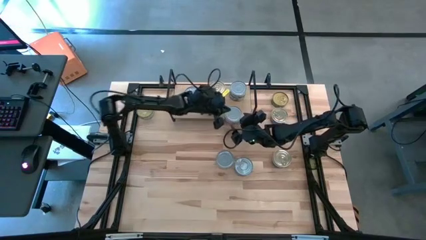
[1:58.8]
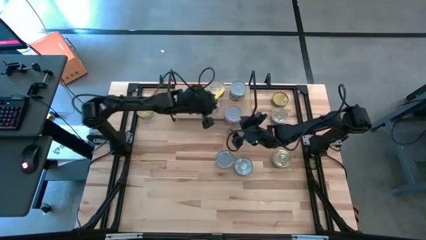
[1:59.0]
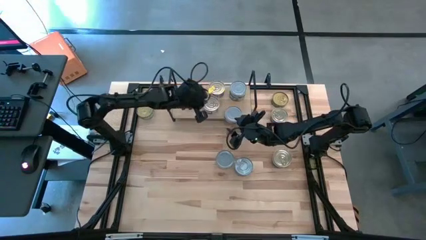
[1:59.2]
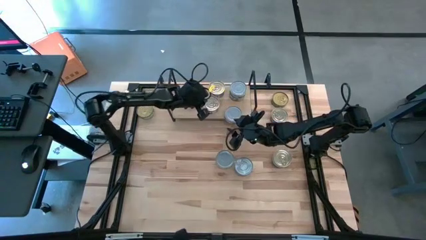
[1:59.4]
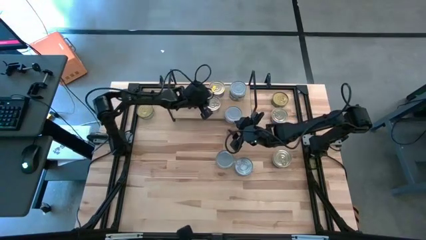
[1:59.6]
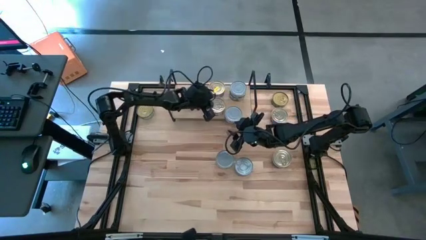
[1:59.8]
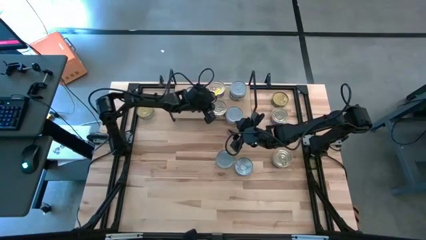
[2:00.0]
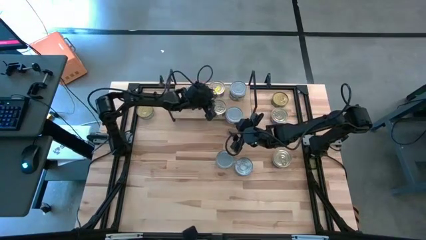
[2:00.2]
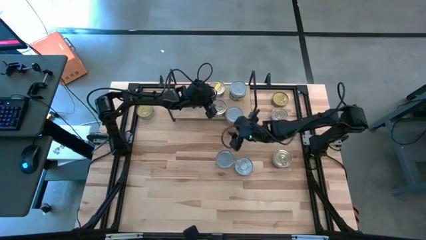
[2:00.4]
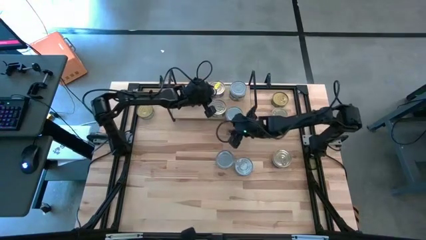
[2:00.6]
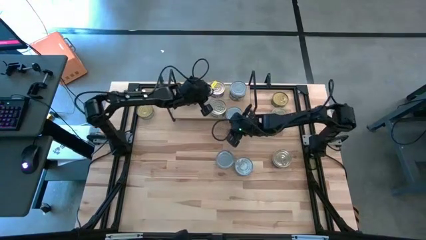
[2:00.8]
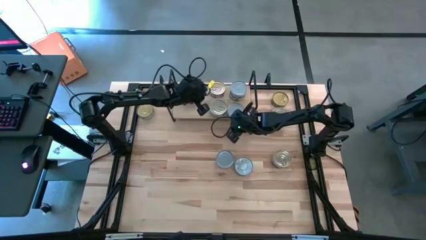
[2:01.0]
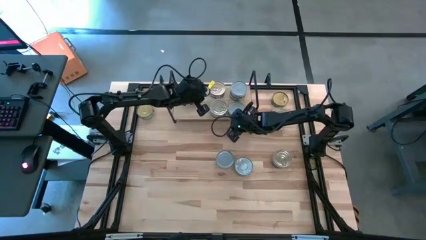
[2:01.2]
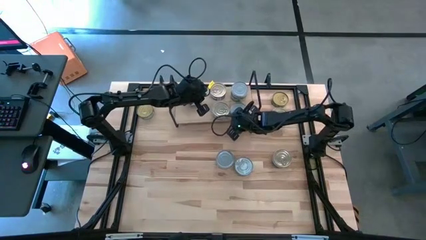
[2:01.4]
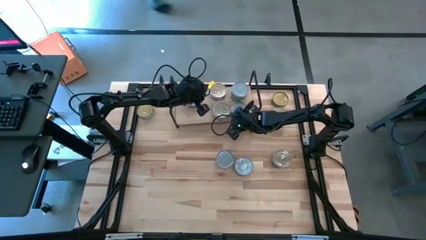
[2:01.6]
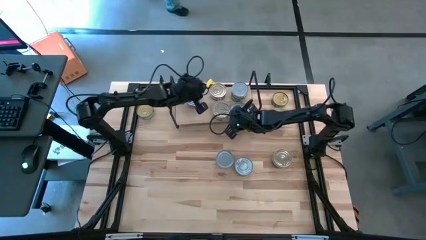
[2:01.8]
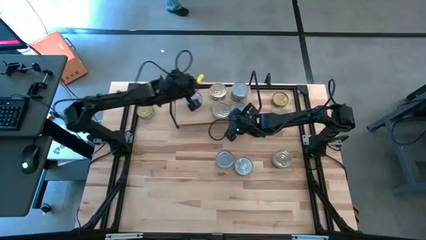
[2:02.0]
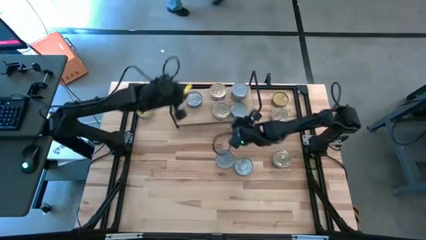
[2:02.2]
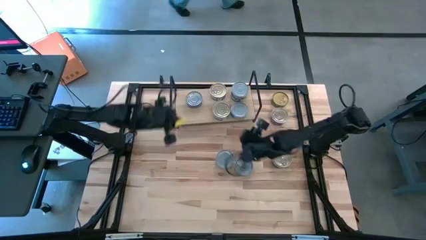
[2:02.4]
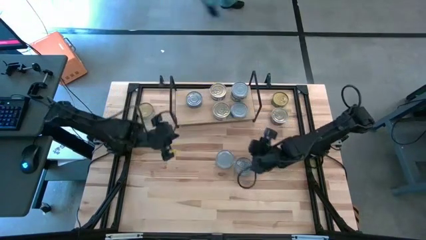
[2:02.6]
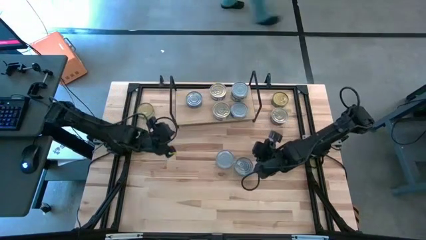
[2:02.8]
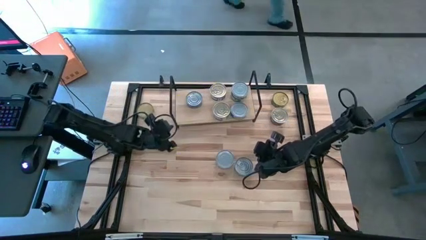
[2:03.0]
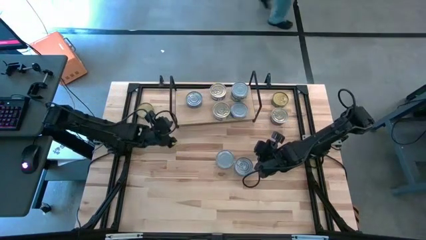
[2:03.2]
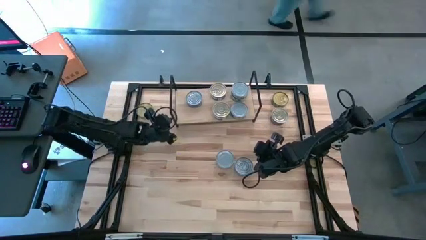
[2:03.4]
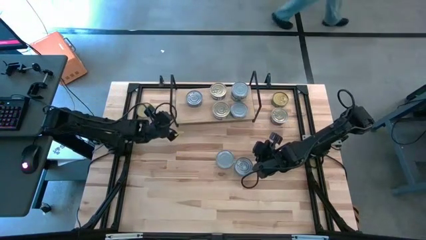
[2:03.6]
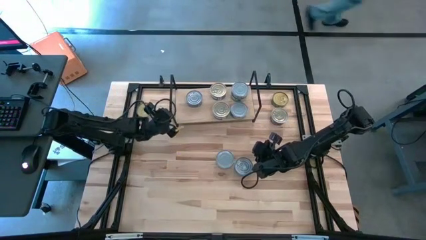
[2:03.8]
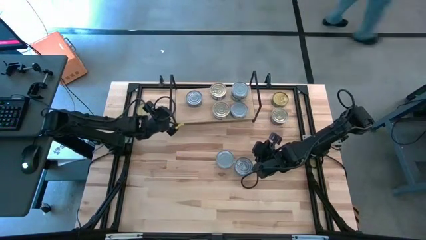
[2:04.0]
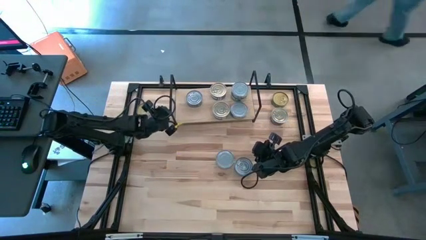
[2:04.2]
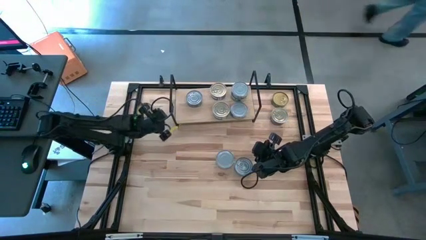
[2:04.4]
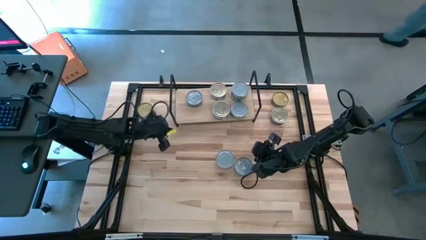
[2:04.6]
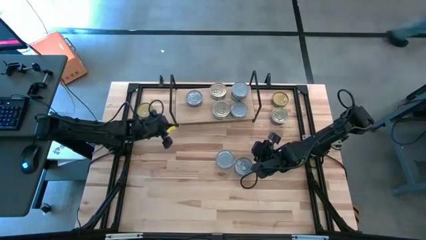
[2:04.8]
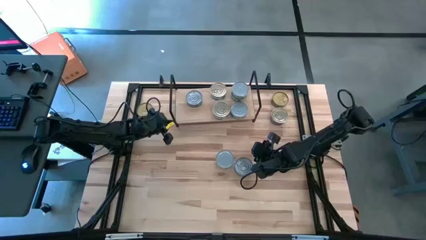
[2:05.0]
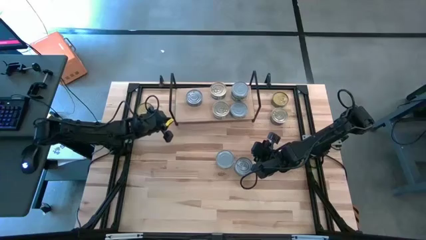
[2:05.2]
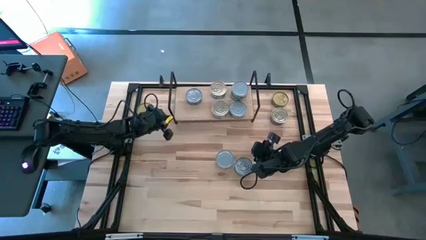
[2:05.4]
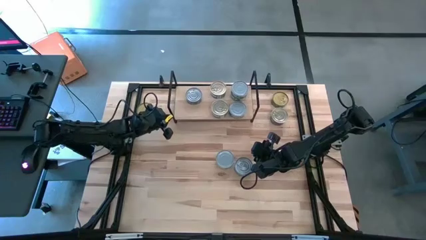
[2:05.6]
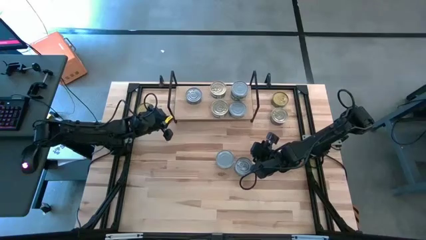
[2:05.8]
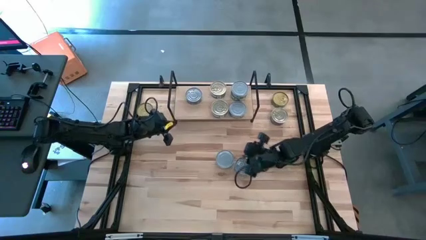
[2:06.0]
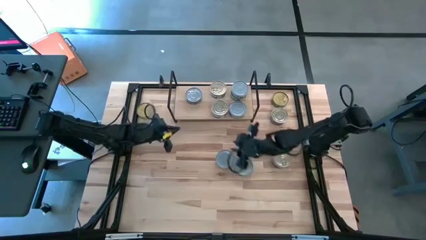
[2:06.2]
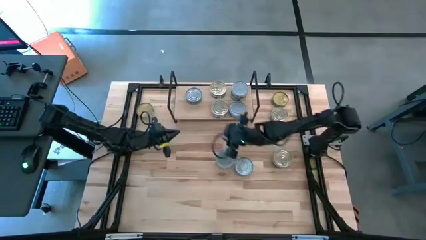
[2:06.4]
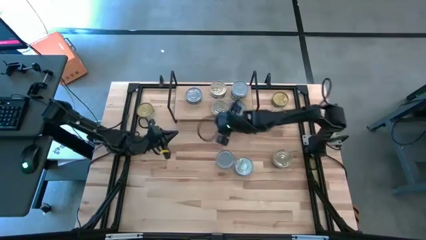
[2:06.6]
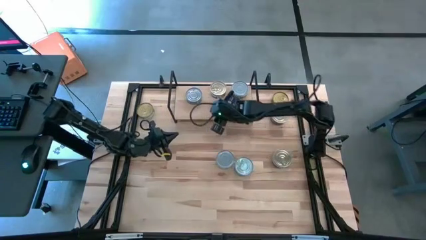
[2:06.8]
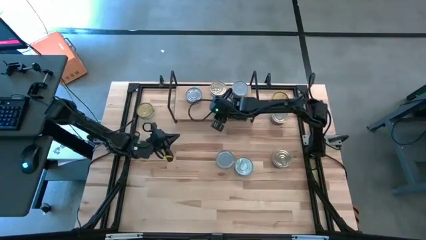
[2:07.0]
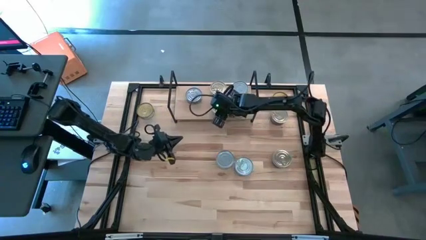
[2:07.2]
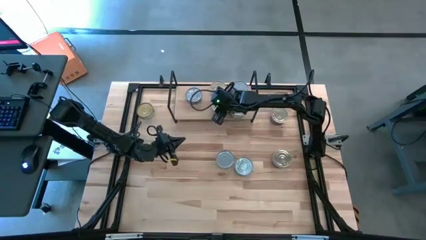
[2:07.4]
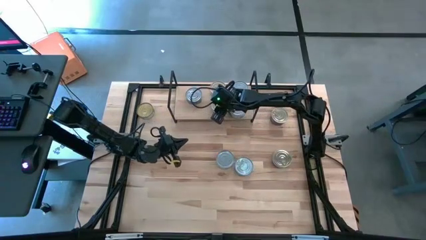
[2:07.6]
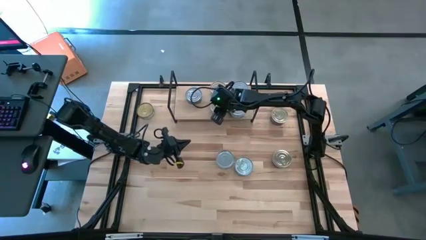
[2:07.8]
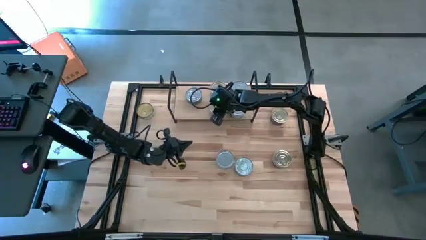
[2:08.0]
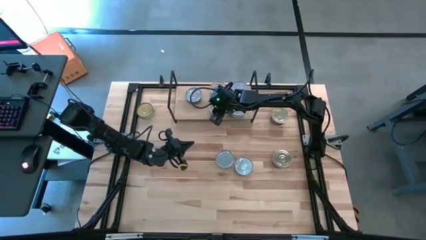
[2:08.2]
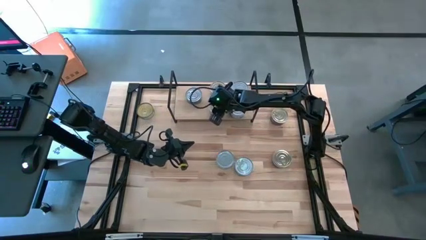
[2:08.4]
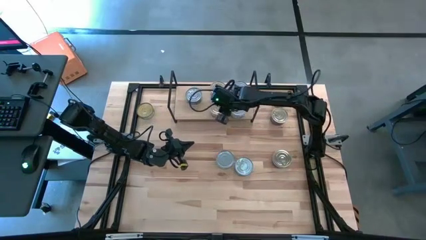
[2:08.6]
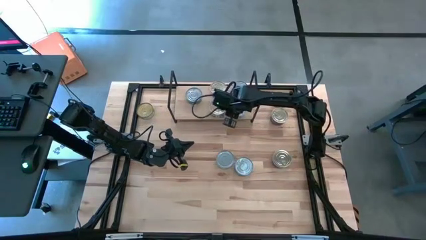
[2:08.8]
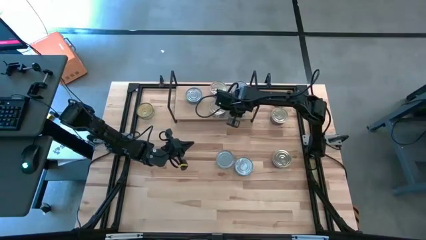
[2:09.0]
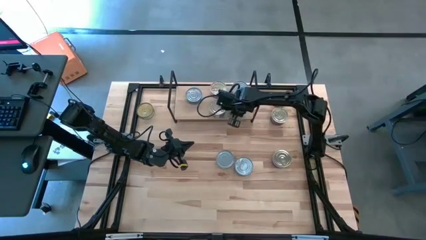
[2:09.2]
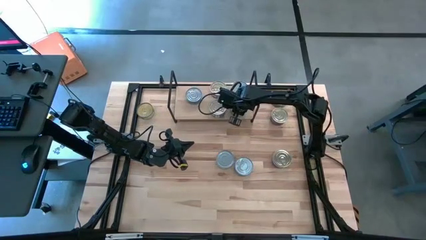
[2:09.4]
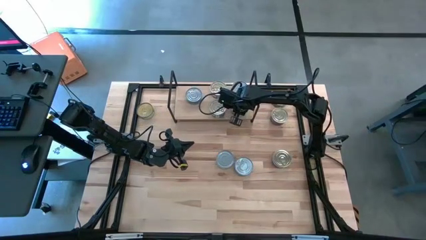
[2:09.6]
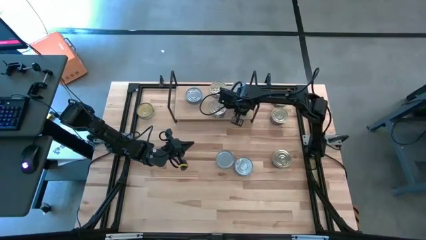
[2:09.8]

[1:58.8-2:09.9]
Task: Stack canned seafood by type on shelf
Adjust the tuna cans and the shelf
